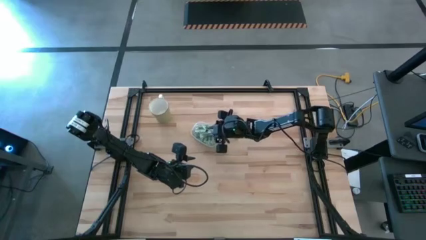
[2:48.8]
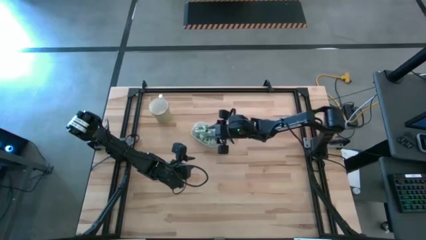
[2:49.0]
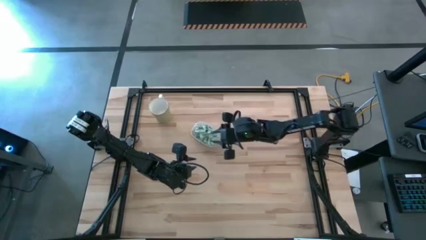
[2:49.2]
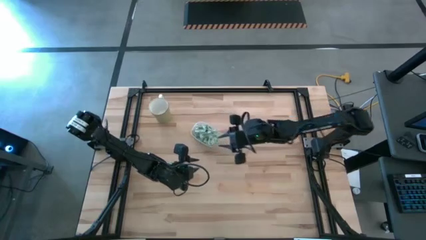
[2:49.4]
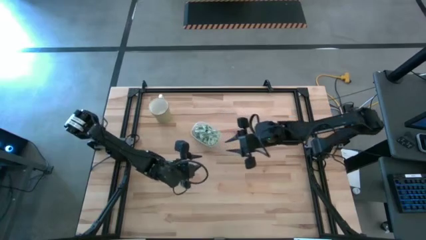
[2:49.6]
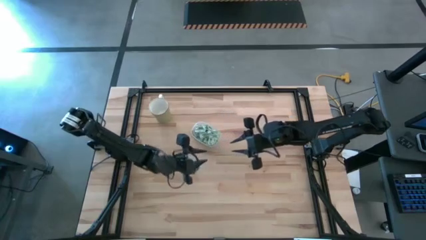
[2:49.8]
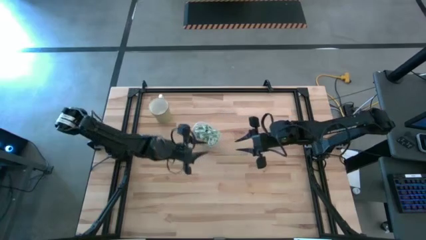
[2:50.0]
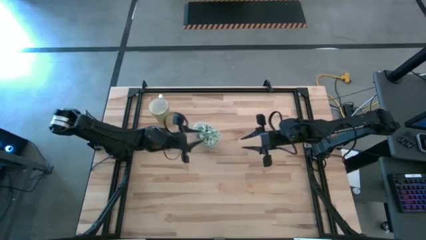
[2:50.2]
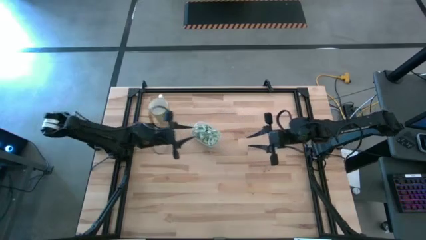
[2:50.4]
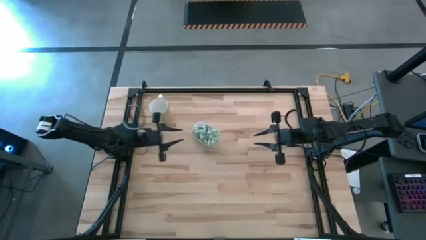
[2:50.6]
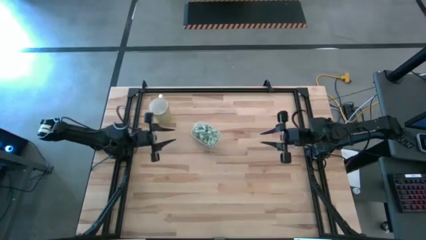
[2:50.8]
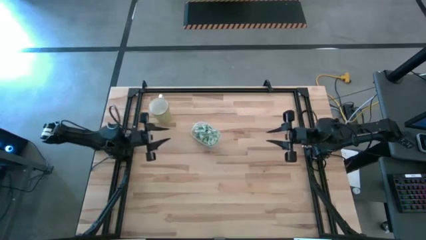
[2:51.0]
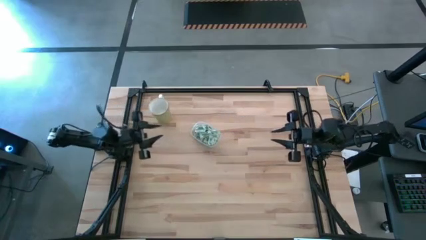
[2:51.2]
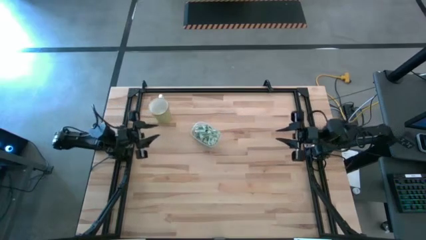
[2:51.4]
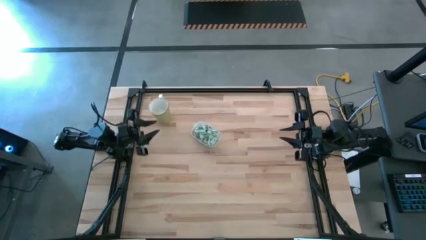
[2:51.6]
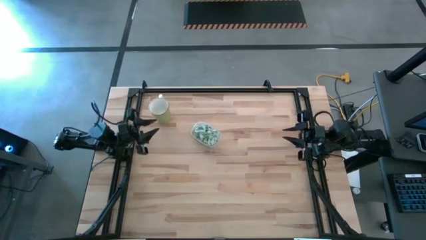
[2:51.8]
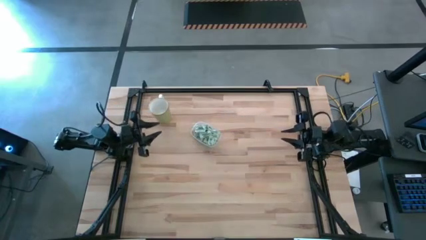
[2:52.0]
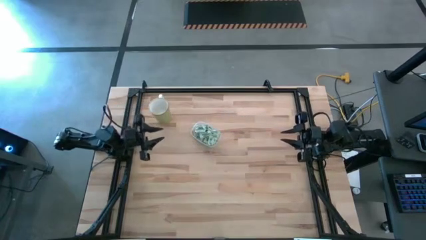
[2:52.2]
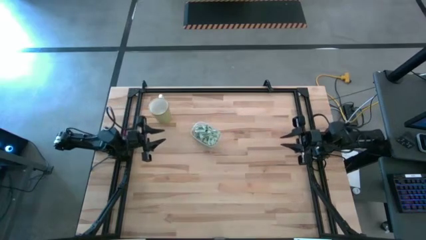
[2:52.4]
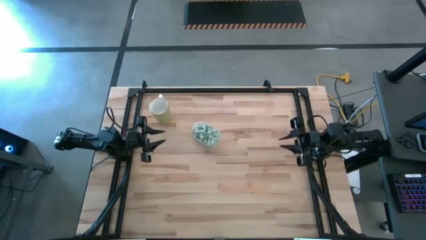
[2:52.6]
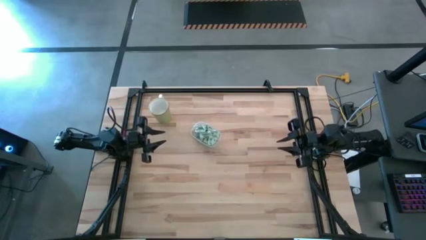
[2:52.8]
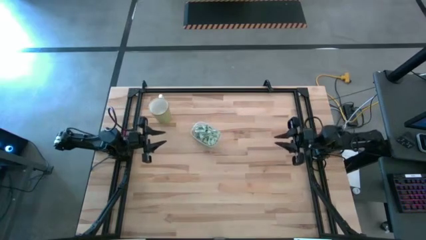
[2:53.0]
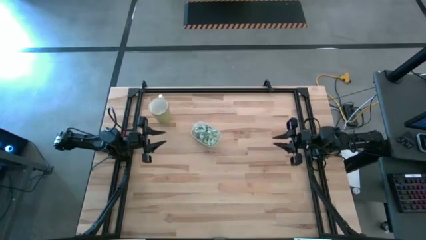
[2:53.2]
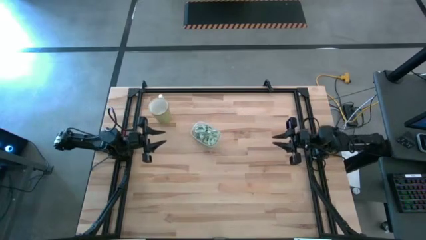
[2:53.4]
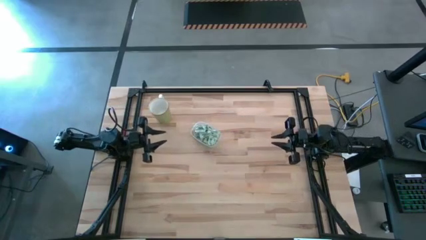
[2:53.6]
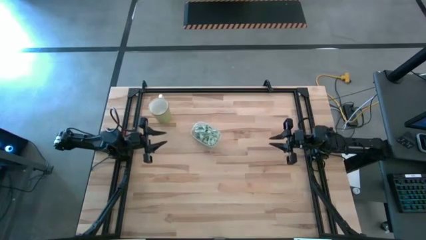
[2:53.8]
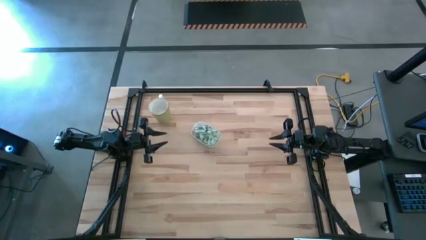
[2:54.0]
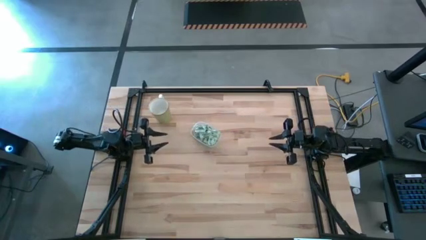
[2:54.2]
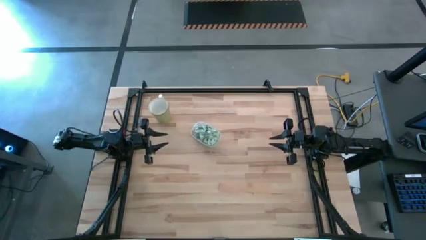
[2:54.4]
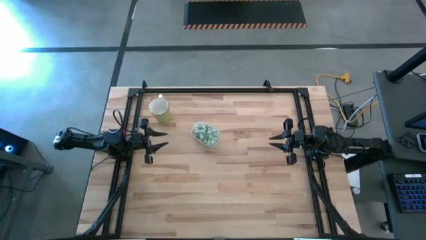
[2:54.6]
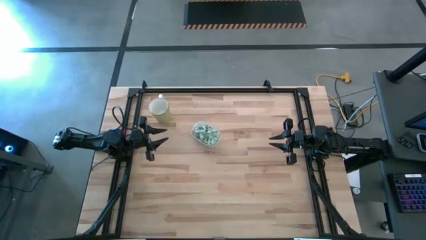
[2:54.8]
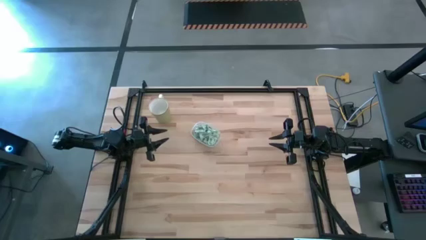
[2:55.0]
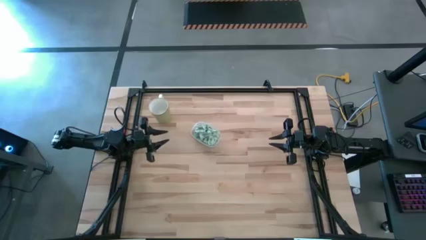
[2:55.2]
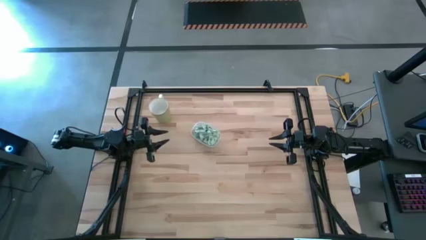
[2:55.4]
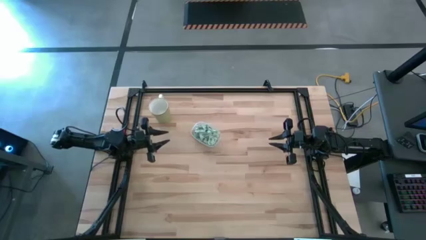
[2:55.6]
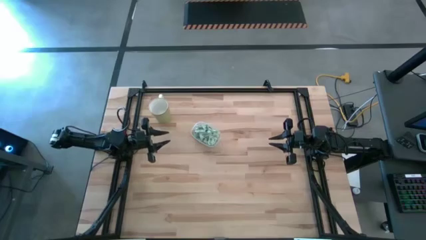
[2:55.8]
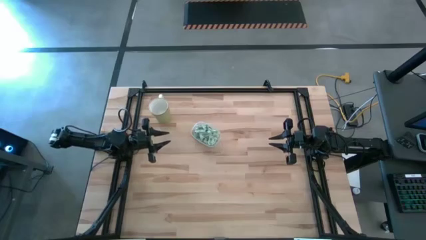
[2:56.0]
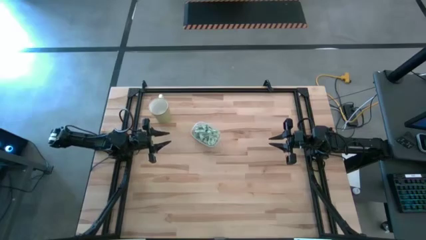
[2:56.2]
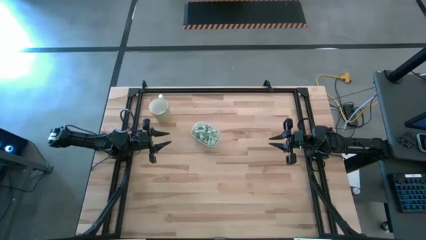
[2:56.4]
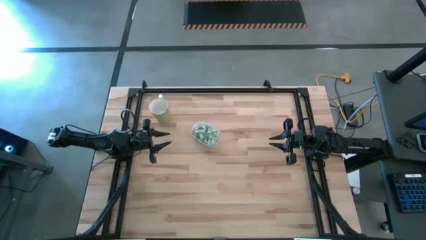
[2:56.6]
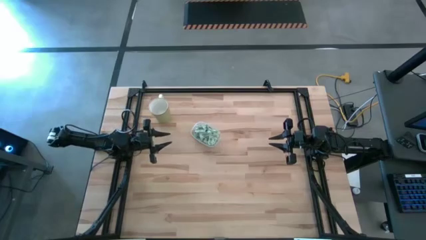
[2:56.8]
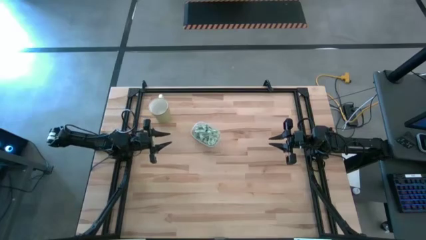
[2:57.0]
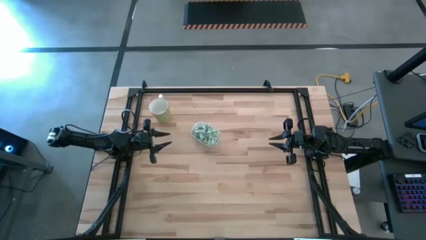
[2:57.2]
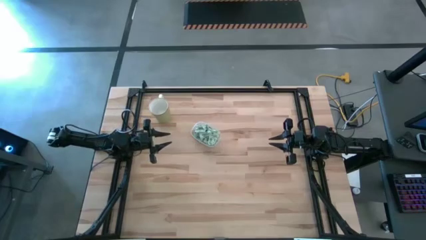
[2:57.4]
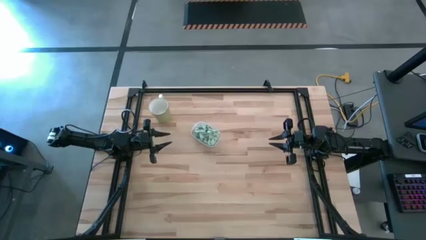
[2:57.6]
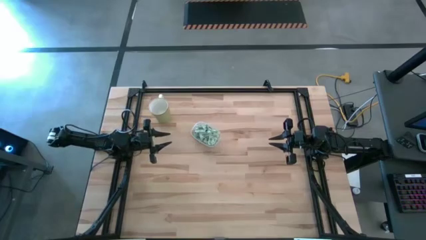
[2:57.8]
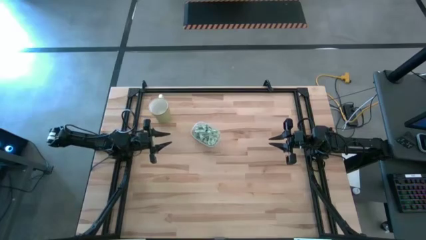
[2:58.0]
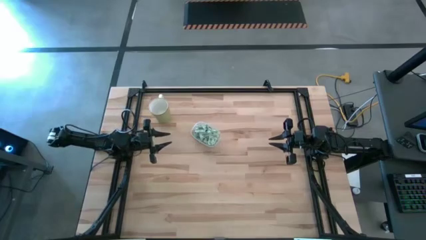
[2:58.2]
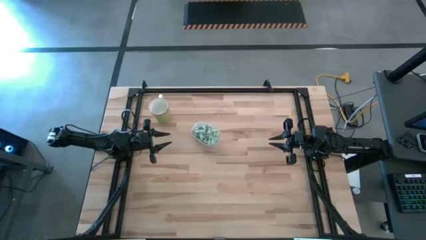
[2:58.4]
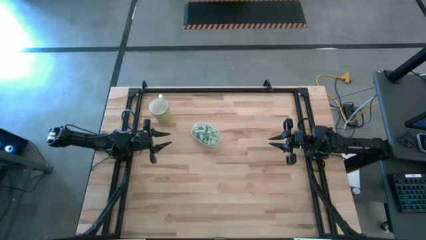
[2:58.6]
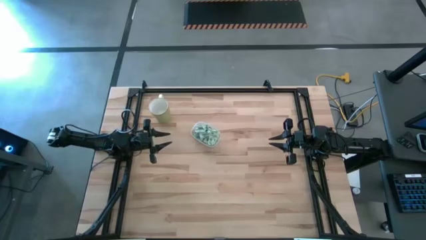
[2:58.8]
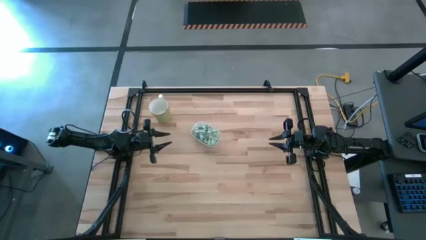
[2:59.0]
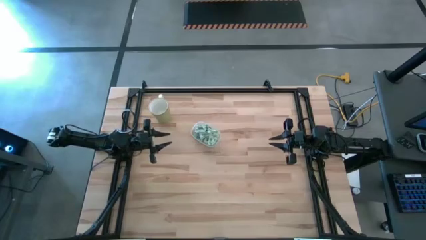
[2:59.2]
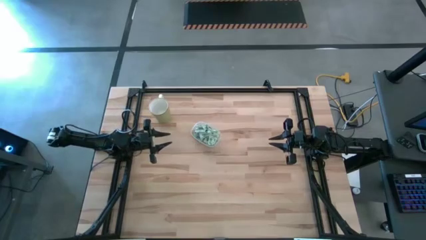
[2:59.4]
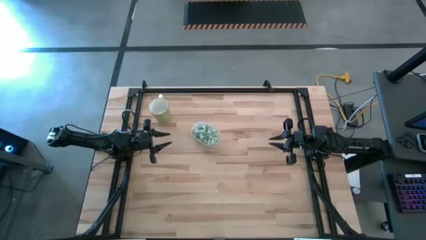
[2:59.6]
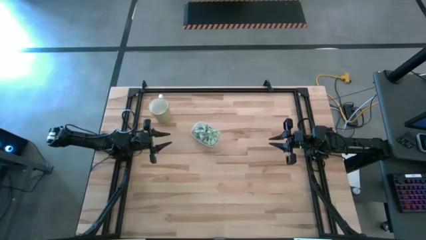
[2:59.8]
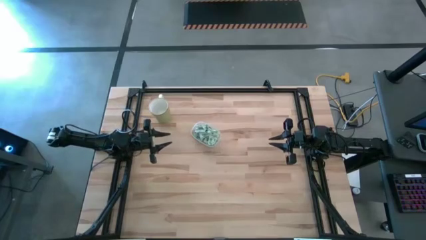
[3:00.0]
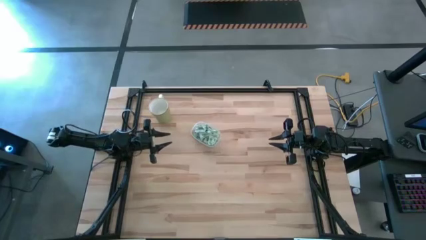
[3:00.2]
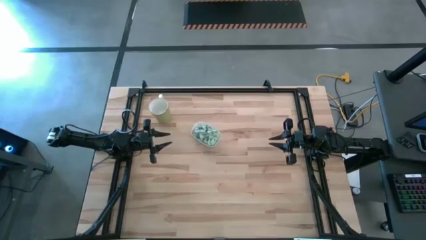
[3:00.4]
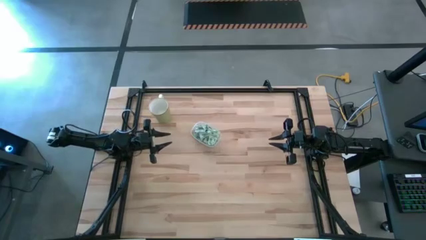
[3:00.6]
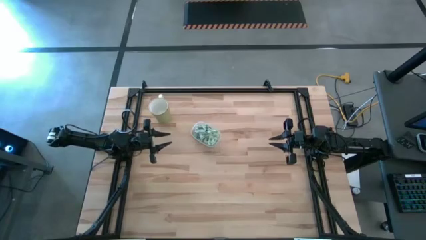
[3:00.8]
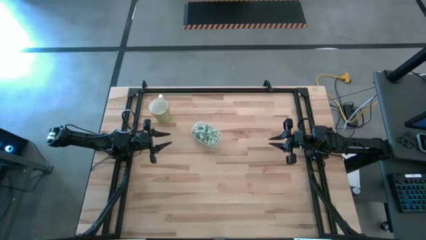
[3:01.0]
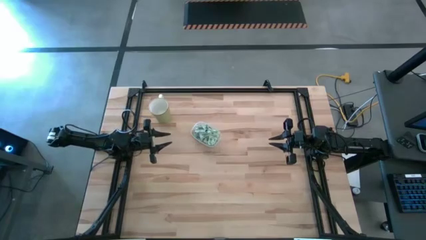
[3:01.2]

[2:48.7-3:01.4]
Task: Pick and place Stevia / Truvia into bins
Return to Home Position

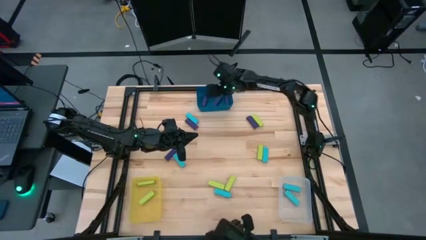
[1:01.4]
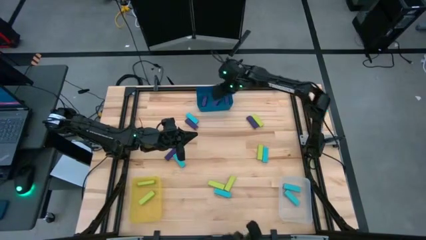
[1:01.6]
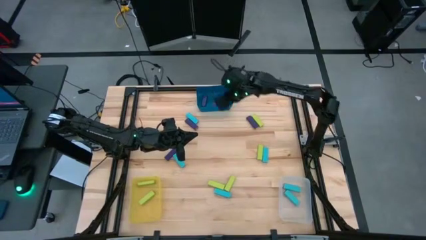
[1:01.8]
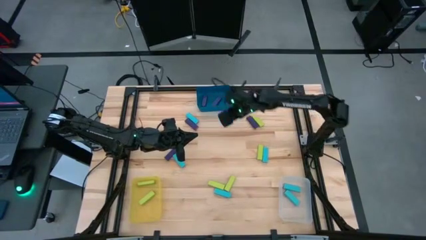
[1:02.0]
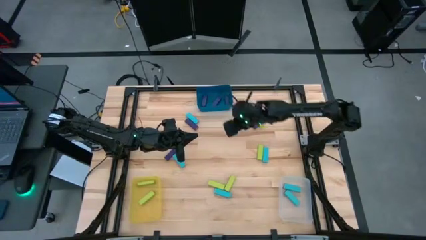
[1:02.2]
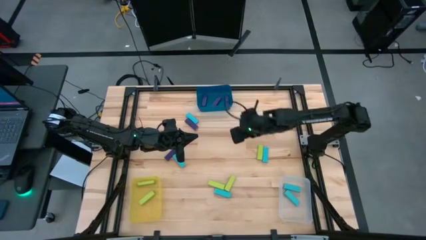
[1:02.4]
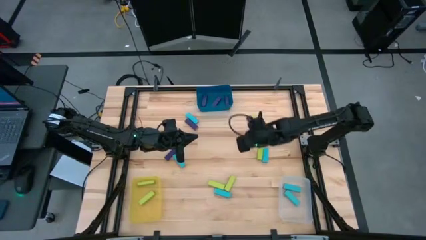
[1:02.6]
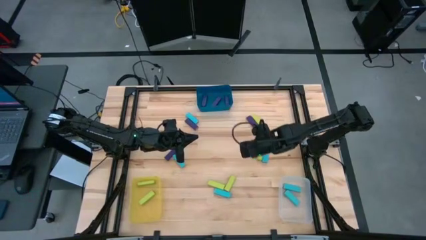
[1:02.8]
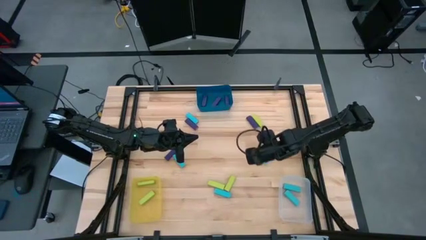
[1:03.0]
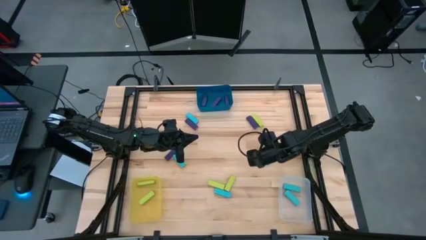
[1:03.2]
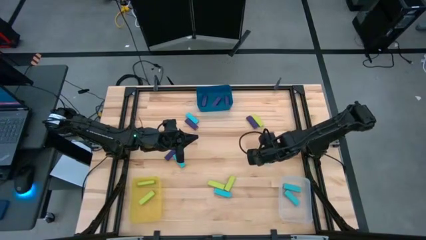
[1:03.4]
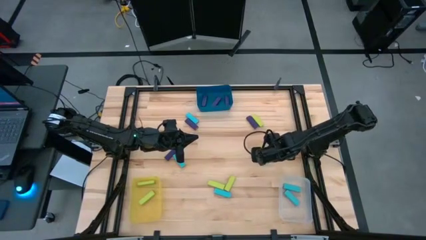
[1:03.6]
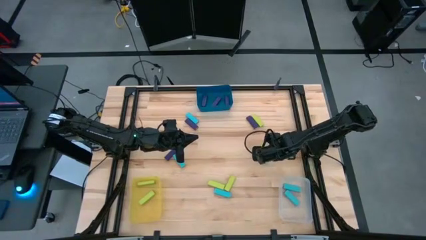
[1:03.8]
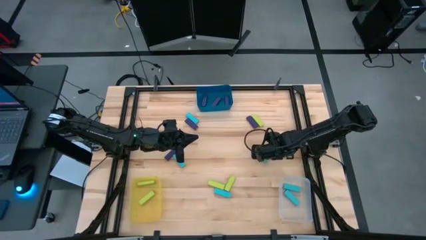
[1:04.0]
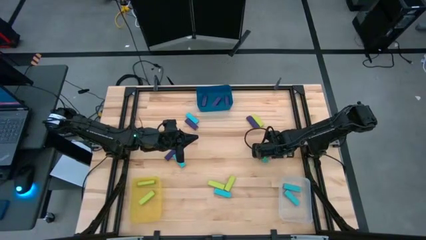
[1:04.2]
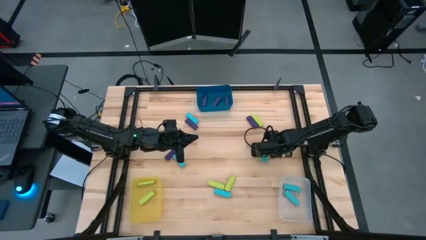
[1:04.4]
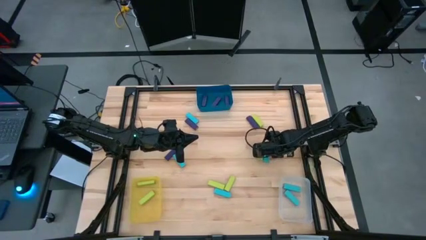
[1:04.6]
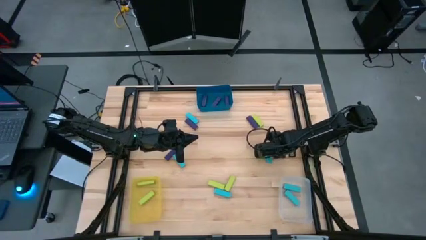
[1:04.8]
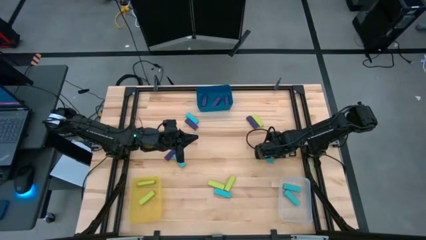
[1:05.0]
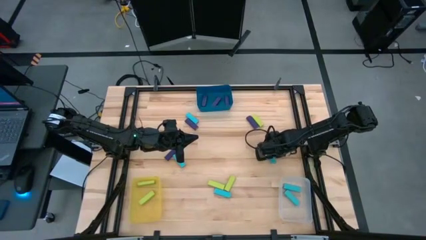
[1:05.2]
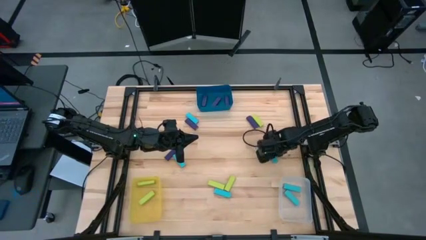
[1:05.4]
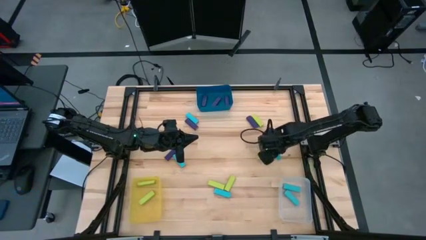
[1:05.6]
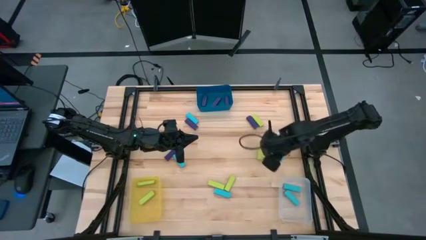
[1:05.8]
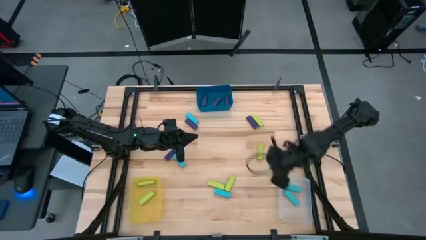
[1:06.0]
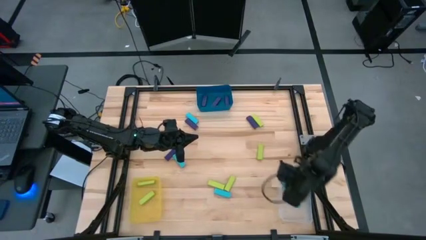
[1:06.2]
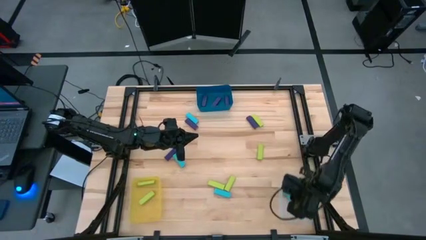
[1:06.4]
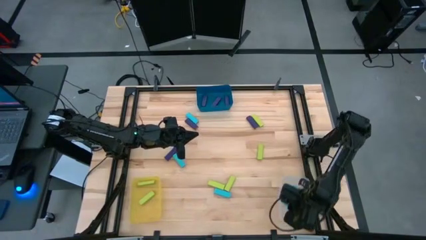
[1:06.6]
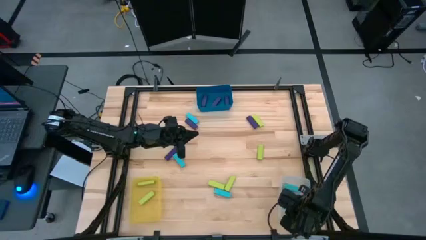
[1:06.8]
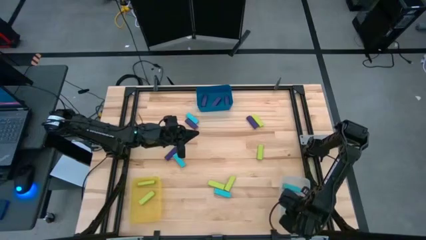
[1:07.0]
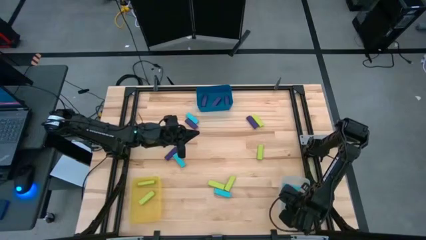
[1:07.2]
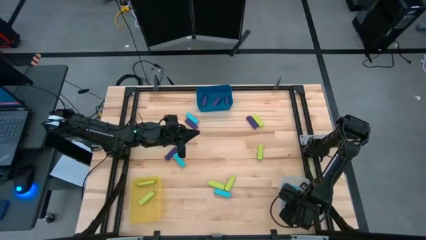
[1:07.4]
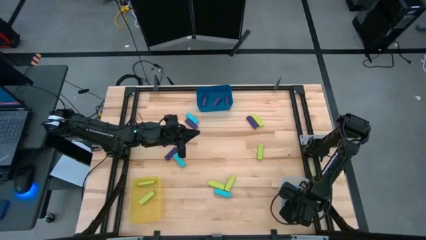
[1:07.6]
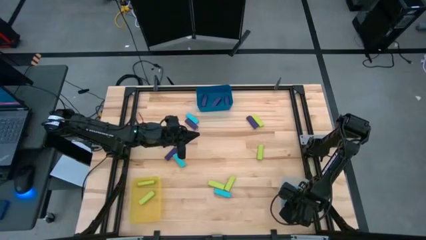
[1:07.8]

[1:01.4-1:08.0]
Task: Sort blocks
Put the sky blue block into the white bin
